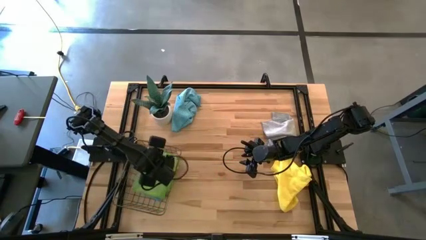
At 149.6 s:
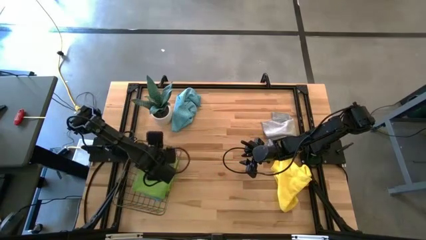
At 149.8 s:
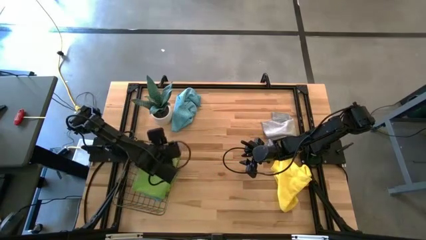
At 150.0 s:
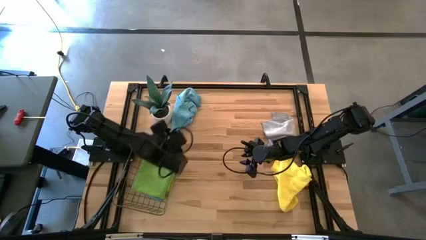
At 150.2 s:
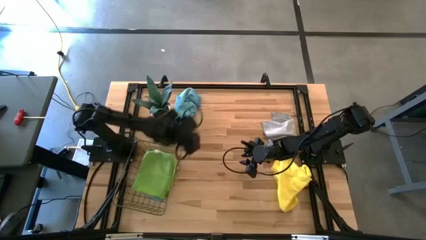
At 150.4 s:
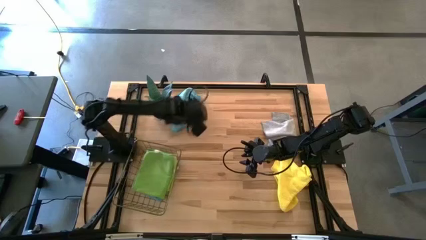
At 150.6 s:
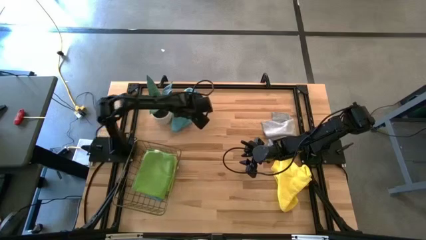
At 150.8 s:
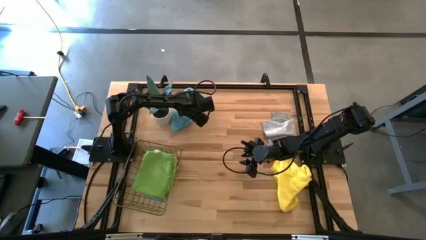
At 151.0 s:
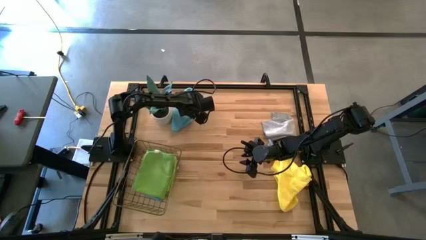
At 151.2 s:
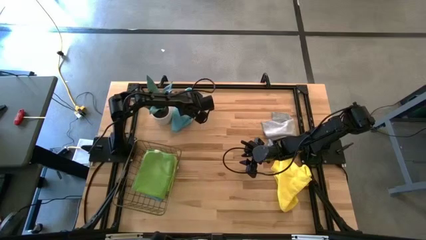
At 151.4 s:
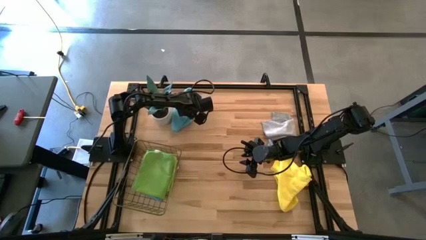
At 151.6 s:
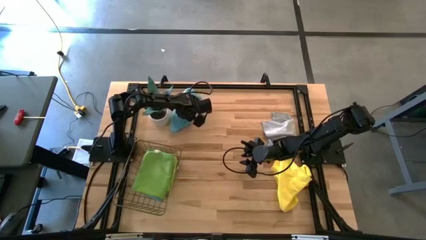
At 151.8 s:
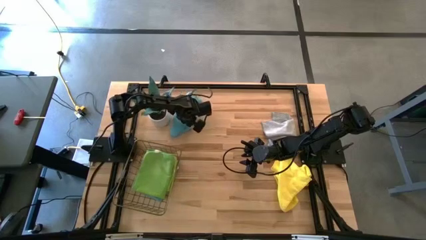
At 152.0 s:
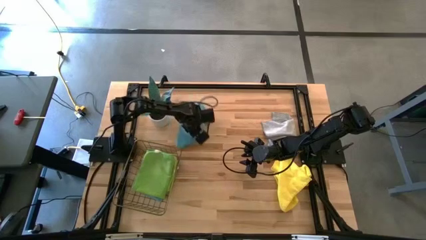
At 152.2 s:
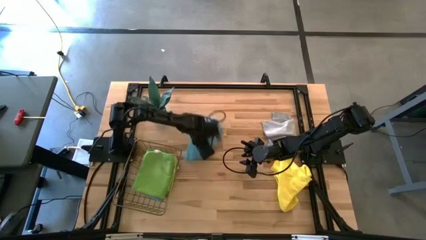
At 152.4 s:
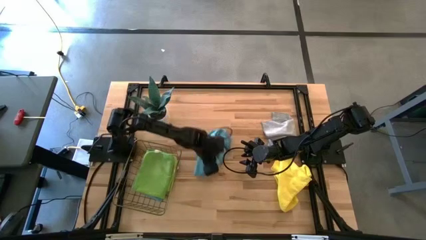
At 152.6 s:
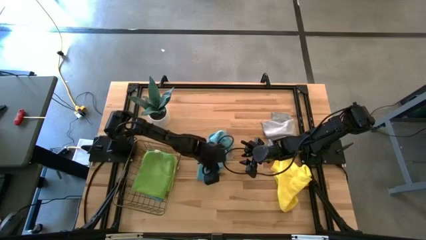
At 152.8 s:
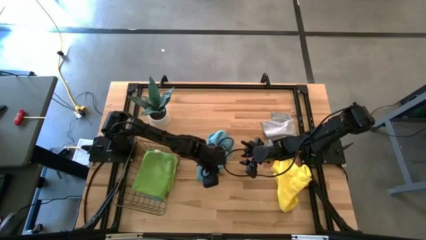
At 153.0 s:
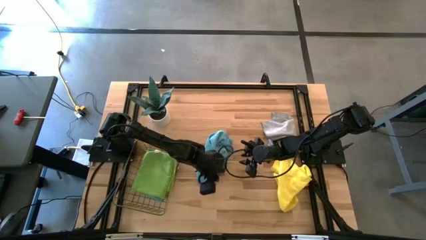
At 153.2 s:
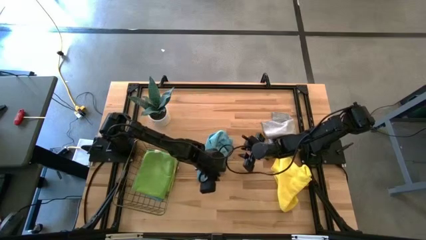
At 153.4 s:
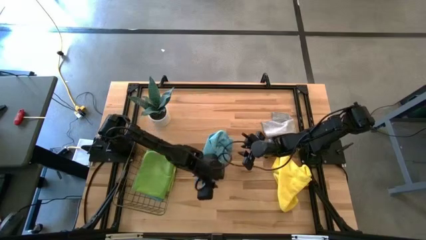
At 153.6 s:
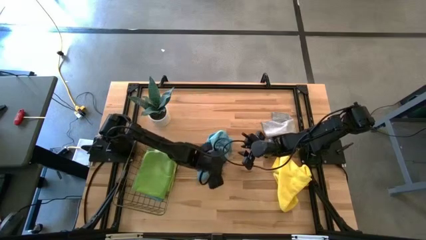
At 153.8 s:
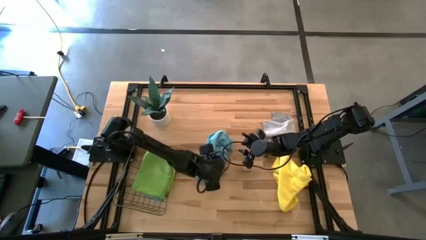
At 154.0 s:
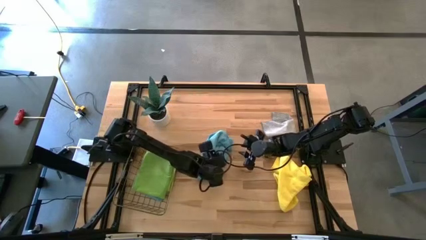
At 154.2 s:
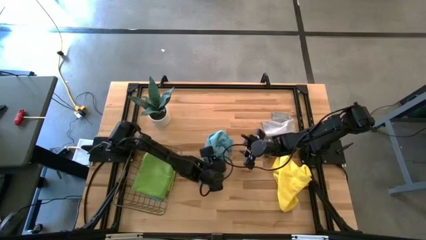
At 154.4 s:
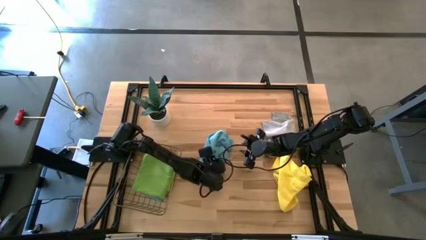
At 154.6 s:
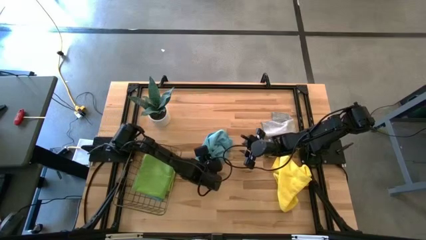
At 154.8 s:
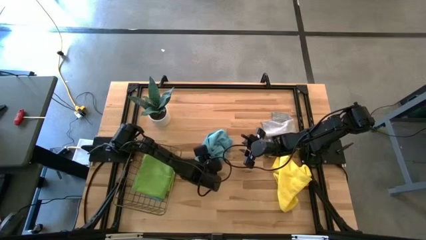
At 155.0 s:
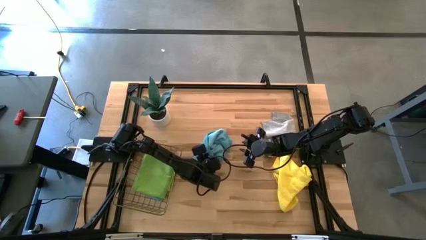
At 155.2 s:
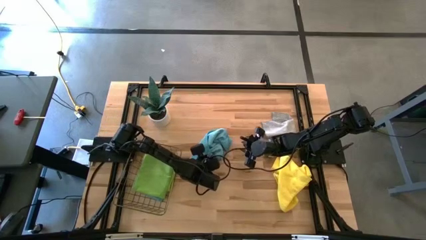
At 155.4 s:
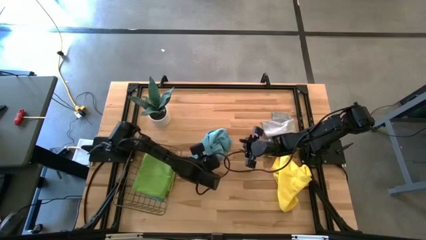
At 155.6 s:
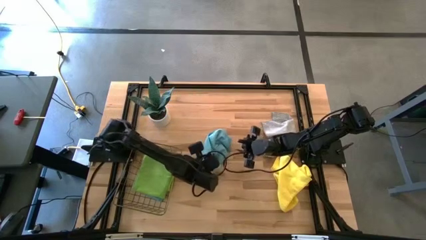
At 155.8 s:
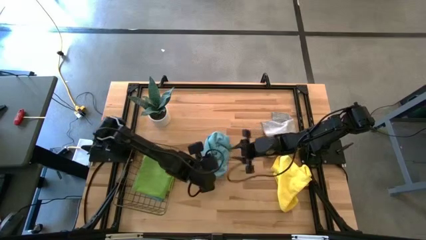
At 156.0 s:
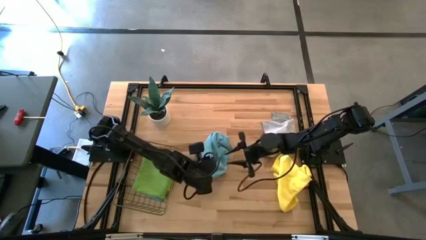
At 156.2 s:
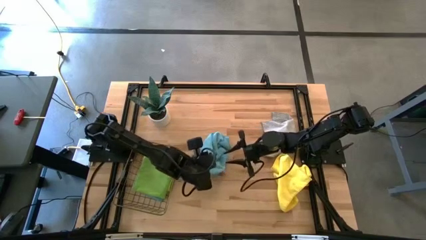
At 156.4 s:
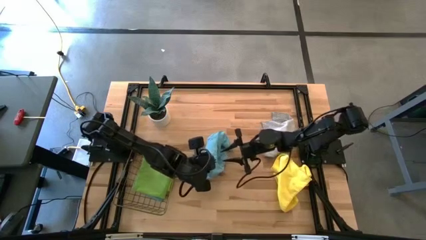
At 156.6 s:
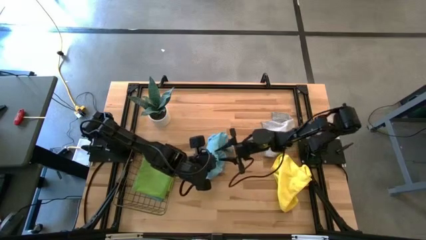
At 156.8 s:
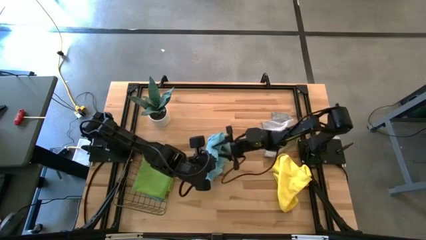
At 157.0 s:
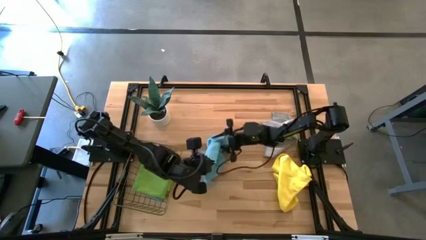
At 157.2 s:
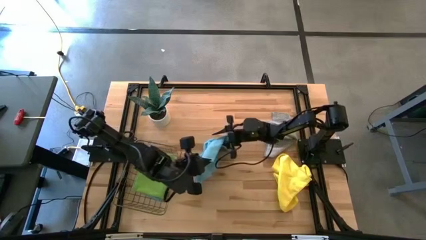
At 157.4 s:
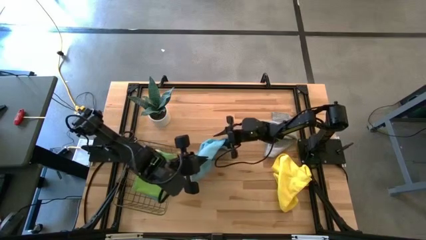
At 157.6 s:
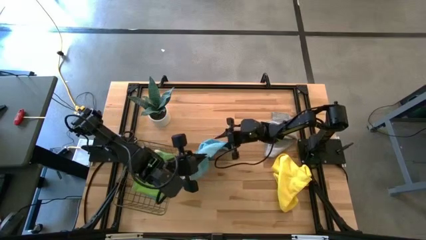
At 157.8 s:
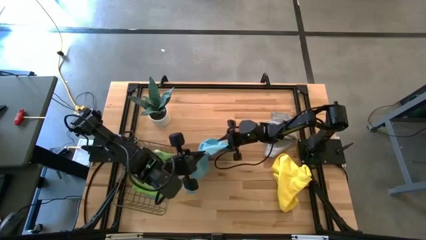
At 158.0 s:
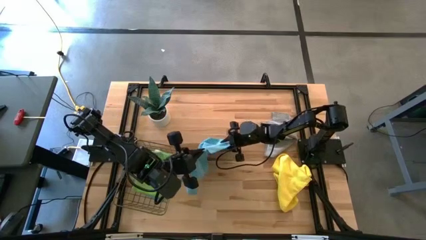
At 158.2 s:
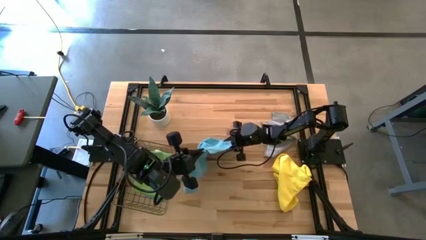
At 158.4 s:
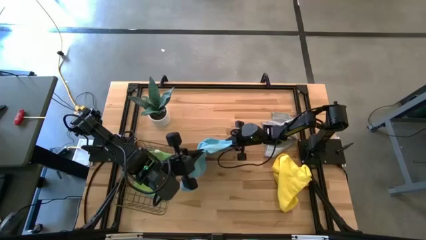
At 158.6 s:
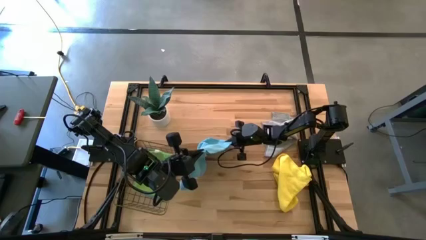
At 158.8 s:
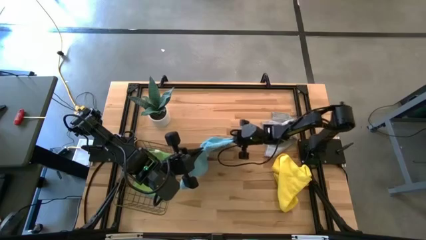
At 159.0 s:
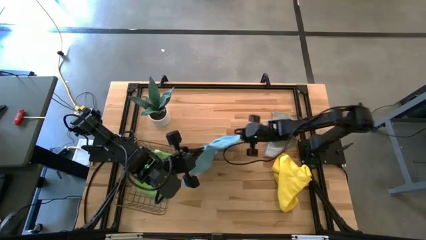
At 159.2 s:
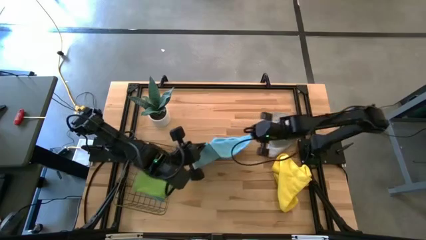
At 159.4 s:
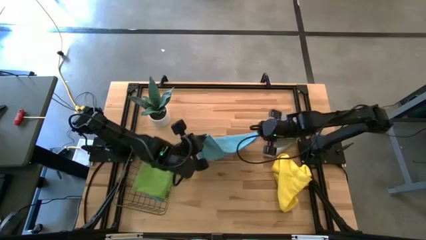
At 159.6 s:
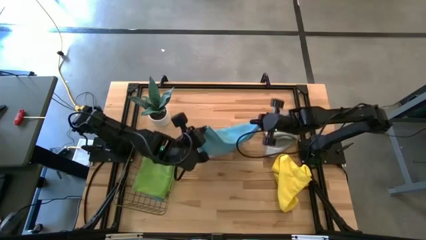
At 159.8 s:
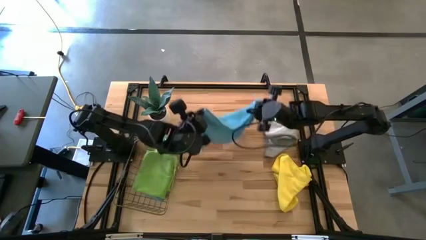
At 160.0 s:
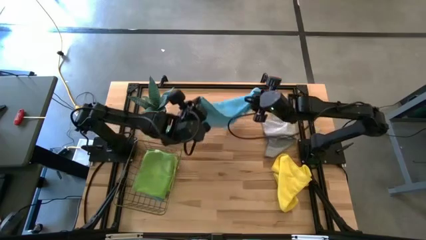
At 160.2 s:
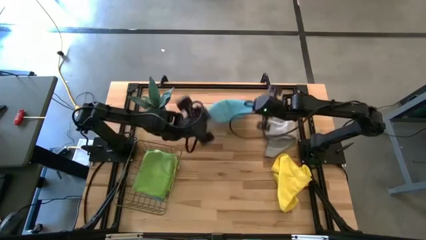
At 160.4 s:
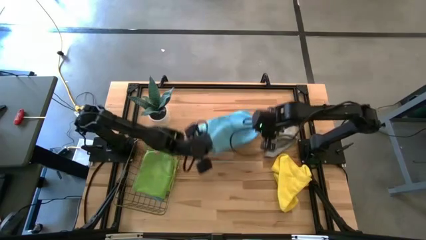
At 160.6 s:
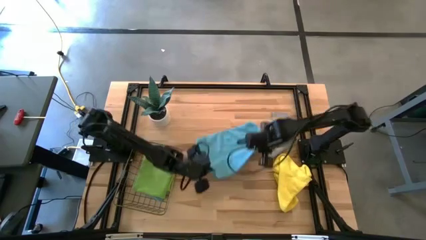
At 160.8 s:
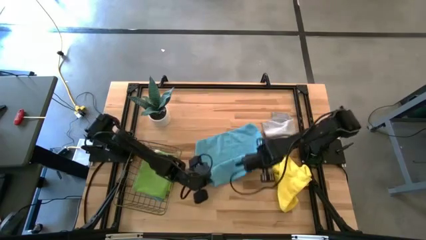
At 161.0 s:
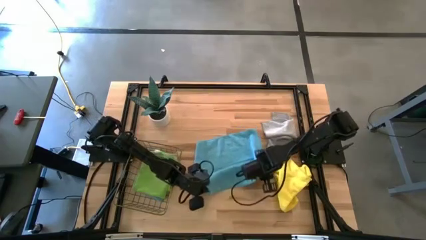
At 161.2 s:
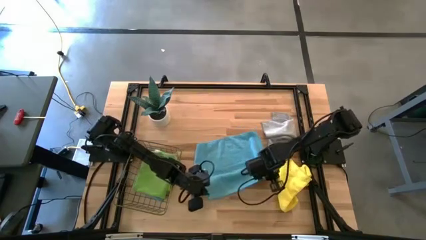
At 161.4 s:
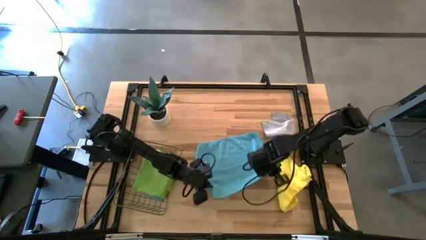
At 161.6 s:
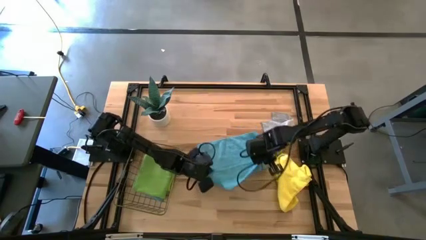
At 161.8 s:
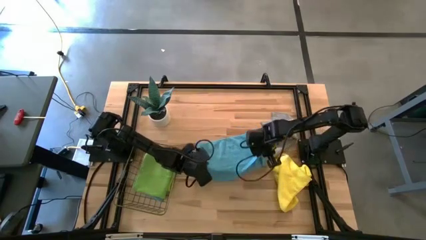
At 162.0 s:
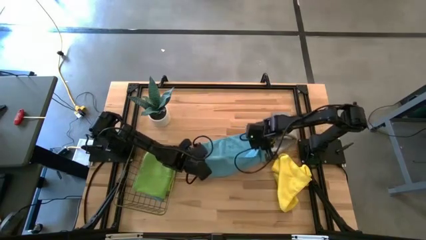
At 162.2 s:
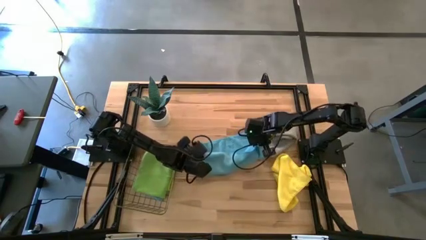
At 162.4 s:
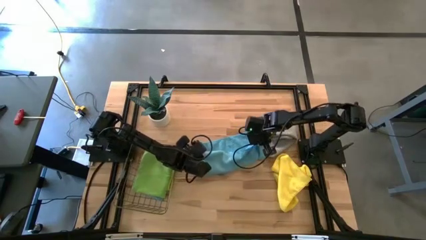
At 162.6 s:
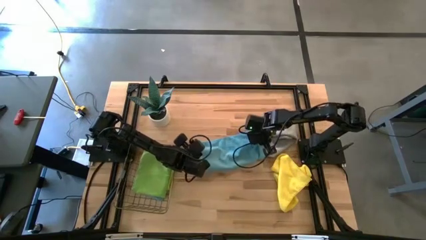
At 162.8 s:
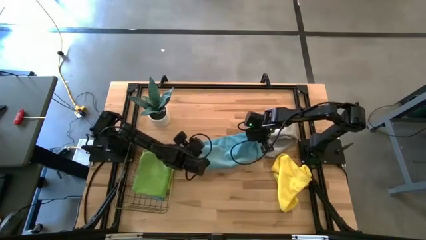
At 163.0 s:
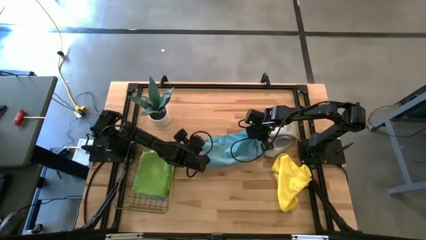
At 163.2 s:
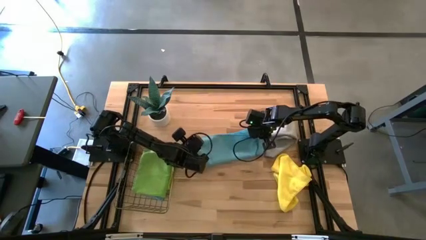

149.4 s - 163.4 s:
Task: Fold microfiber towels
Fold the blue microfiber towel
